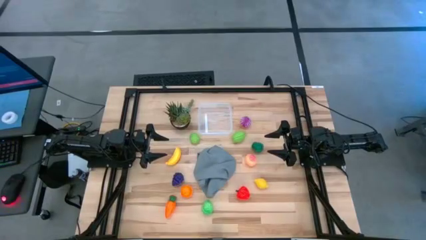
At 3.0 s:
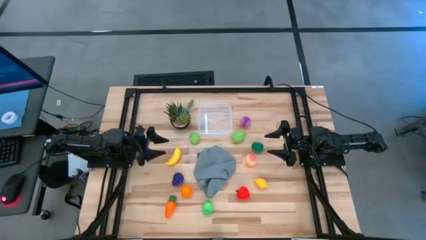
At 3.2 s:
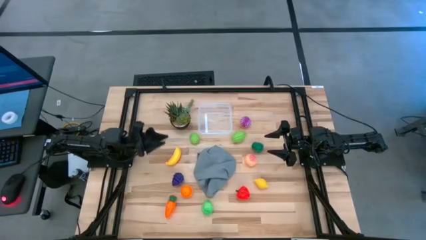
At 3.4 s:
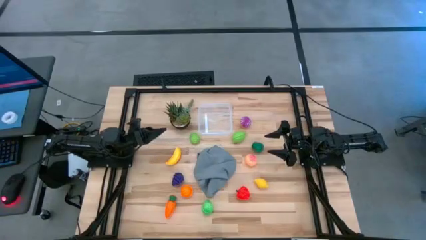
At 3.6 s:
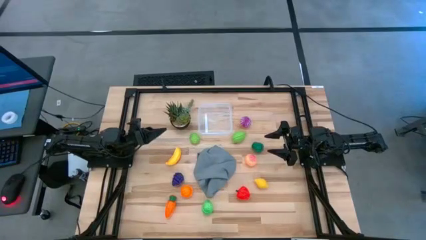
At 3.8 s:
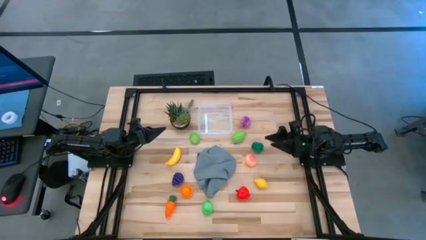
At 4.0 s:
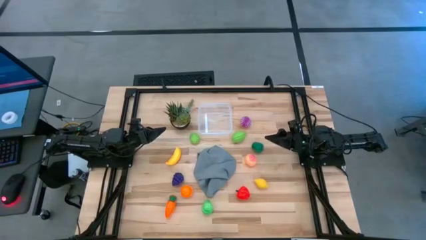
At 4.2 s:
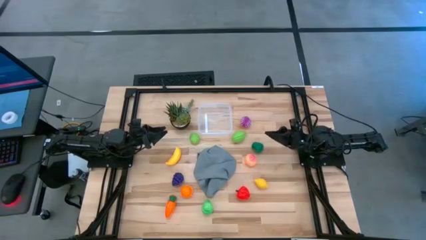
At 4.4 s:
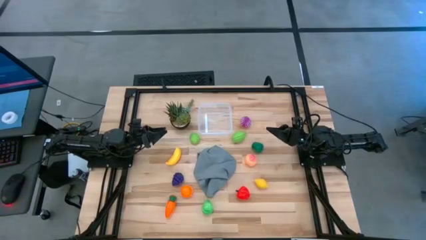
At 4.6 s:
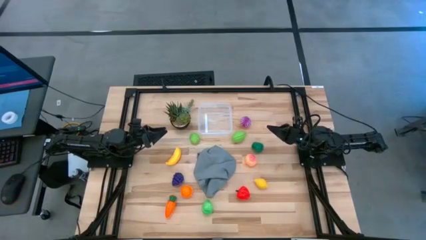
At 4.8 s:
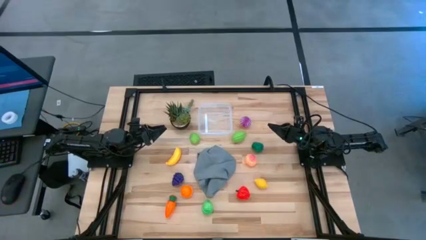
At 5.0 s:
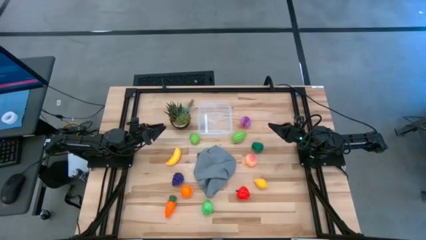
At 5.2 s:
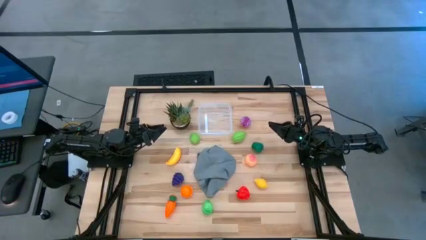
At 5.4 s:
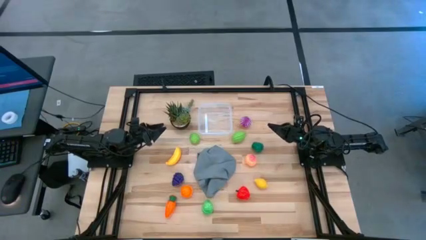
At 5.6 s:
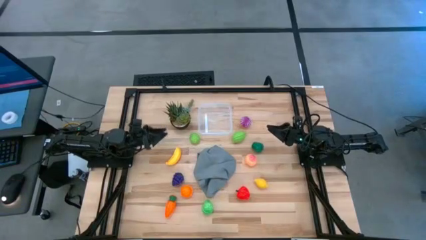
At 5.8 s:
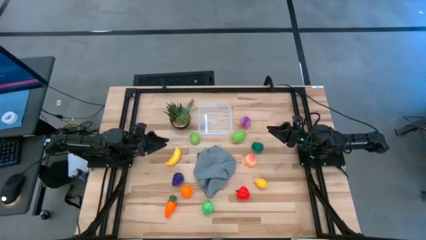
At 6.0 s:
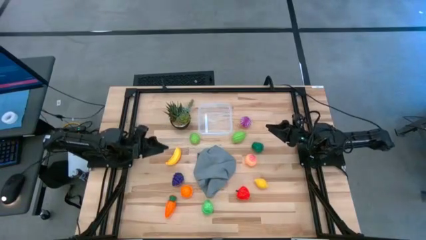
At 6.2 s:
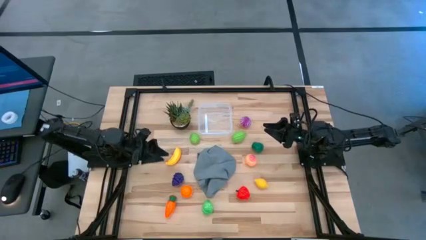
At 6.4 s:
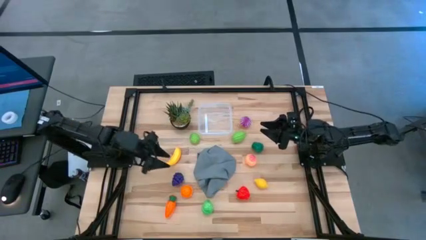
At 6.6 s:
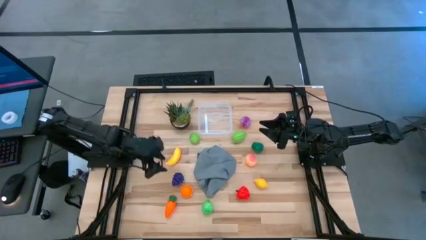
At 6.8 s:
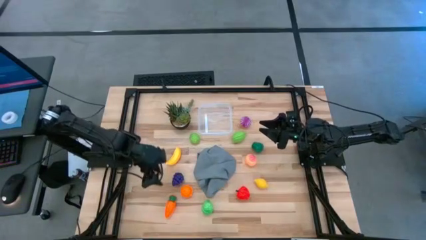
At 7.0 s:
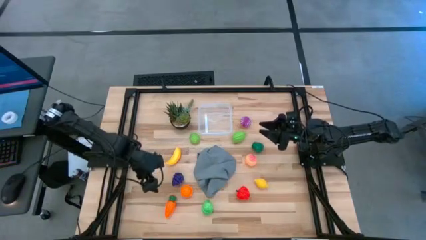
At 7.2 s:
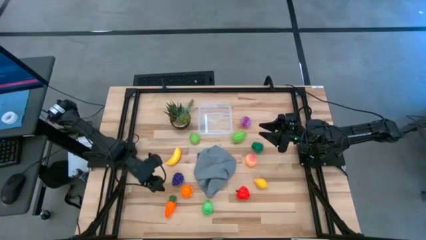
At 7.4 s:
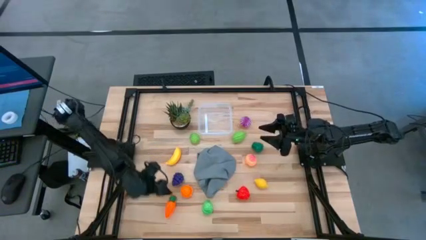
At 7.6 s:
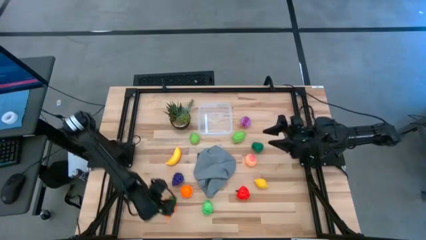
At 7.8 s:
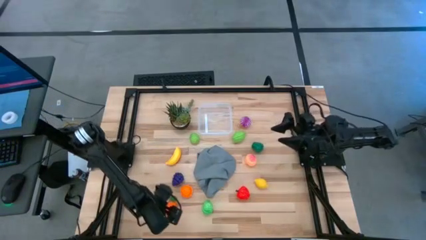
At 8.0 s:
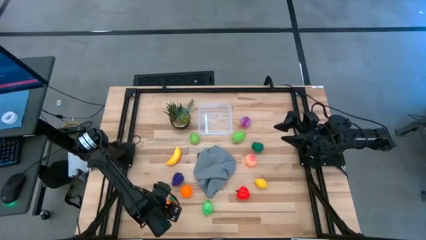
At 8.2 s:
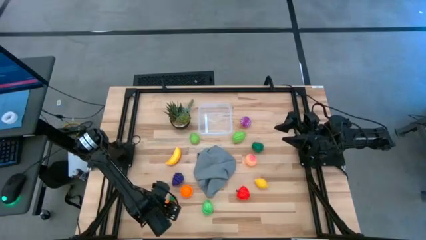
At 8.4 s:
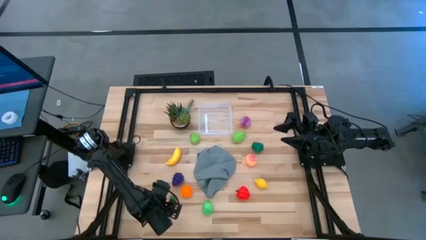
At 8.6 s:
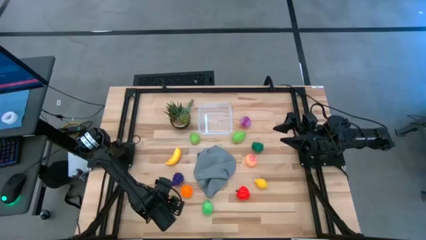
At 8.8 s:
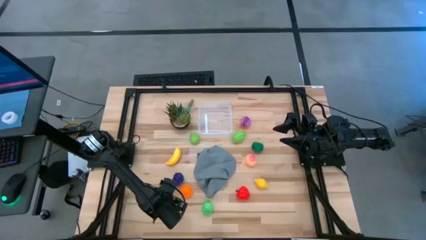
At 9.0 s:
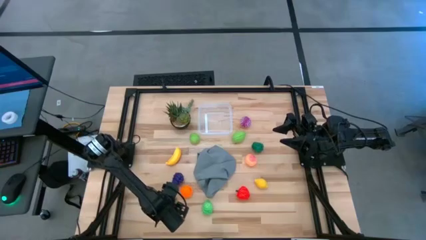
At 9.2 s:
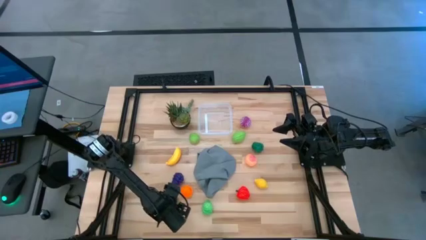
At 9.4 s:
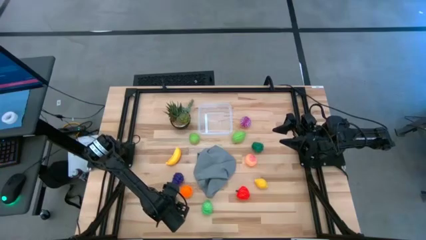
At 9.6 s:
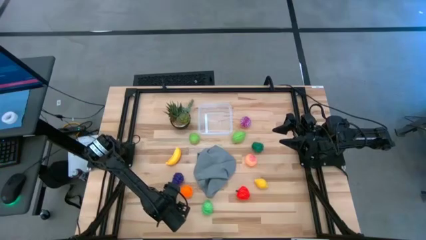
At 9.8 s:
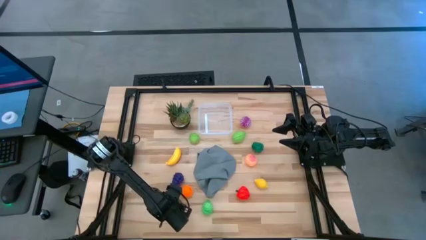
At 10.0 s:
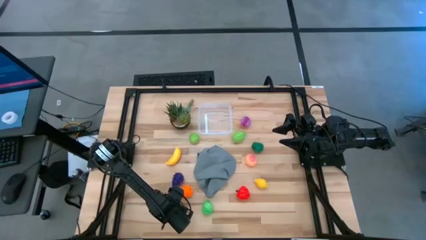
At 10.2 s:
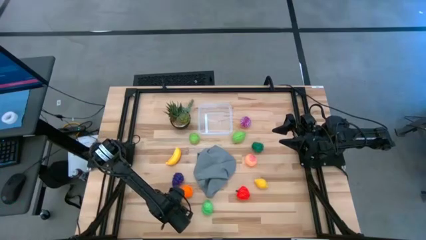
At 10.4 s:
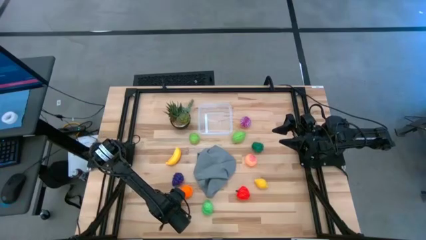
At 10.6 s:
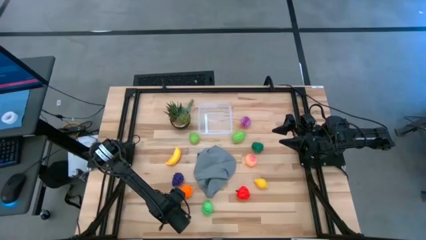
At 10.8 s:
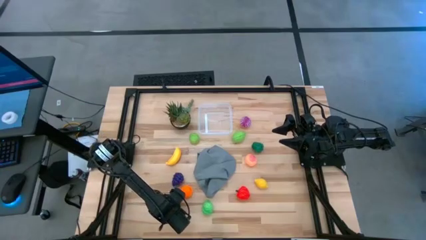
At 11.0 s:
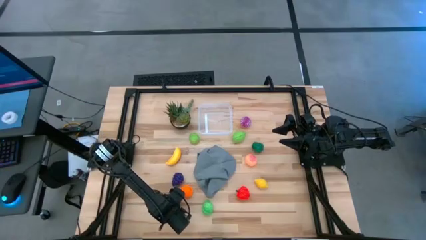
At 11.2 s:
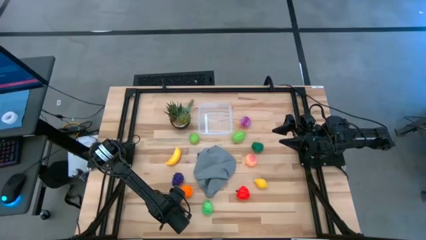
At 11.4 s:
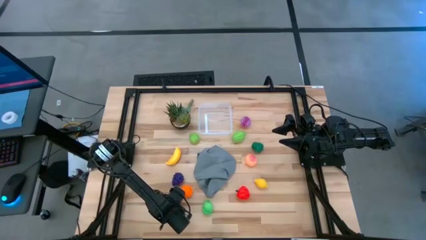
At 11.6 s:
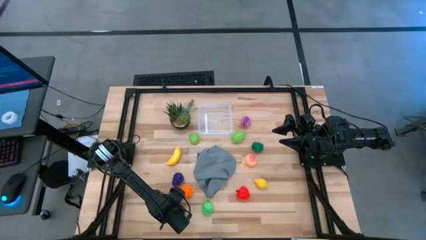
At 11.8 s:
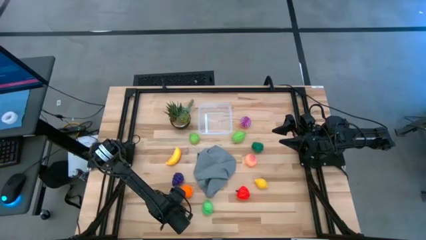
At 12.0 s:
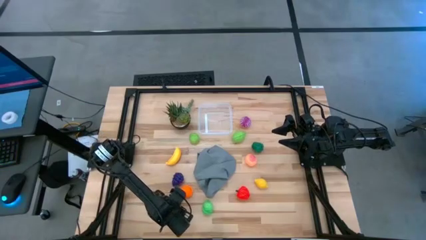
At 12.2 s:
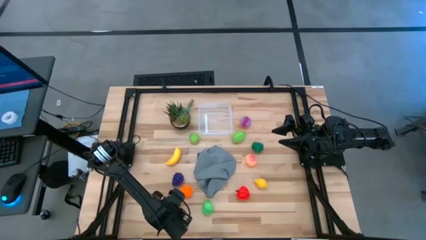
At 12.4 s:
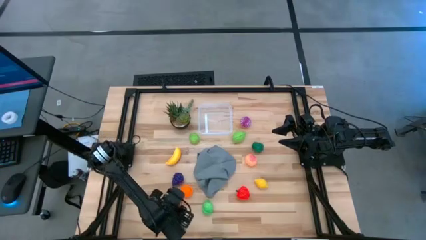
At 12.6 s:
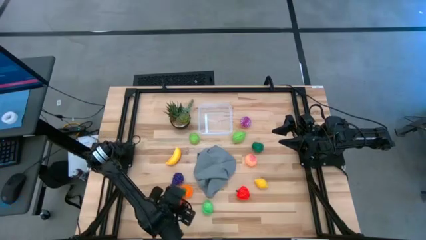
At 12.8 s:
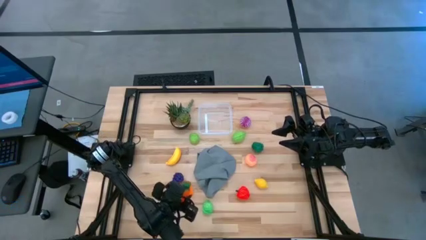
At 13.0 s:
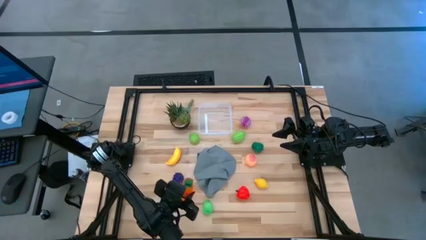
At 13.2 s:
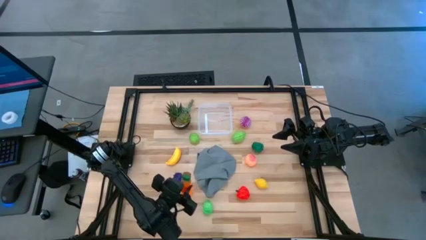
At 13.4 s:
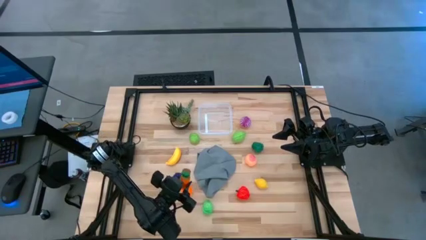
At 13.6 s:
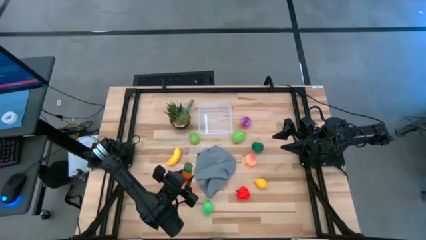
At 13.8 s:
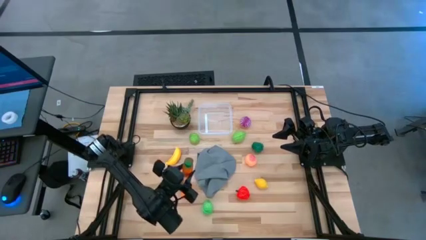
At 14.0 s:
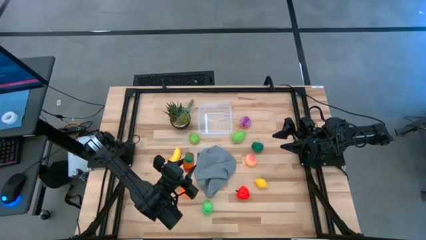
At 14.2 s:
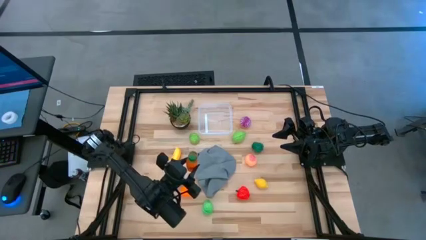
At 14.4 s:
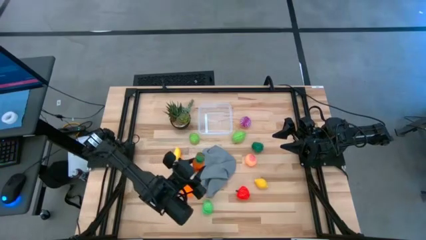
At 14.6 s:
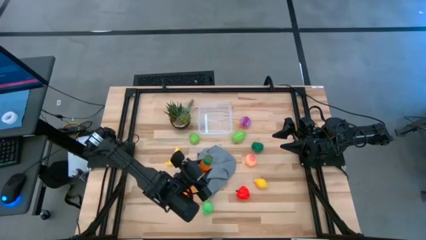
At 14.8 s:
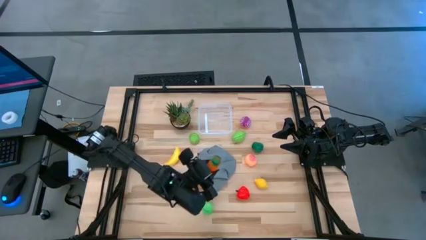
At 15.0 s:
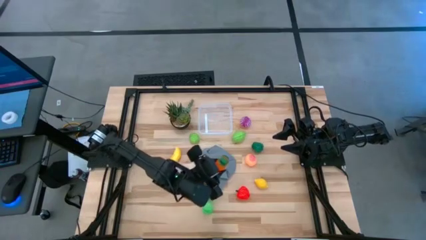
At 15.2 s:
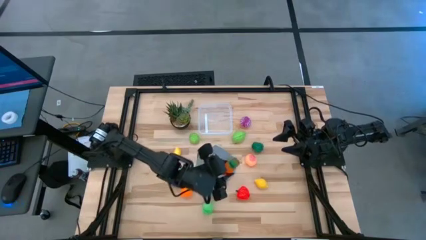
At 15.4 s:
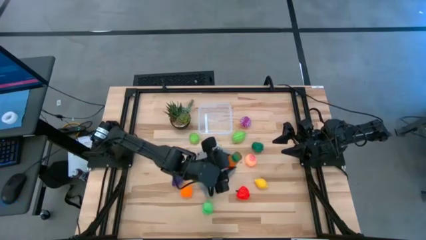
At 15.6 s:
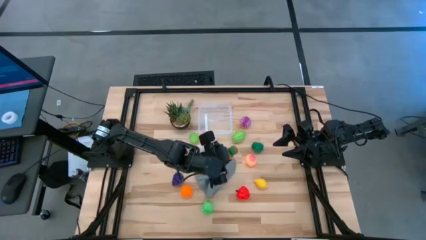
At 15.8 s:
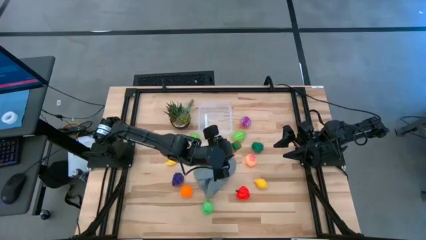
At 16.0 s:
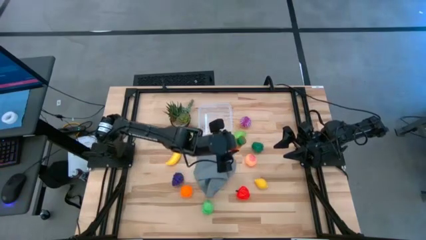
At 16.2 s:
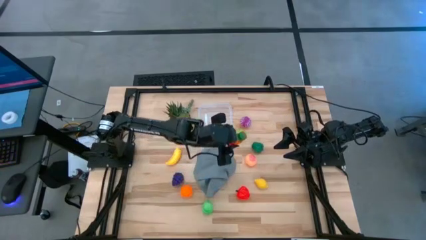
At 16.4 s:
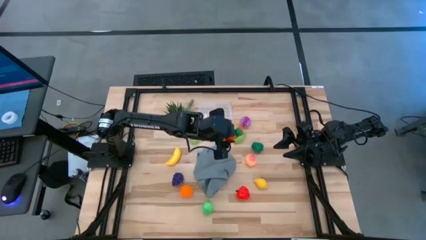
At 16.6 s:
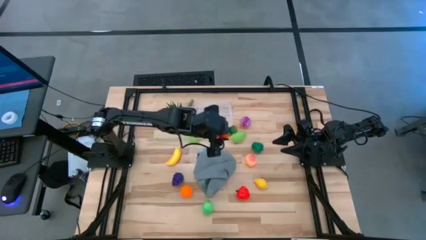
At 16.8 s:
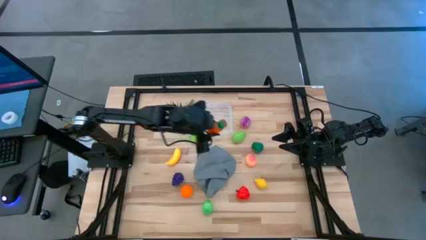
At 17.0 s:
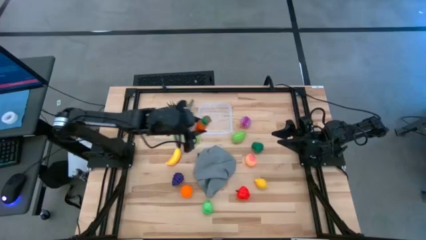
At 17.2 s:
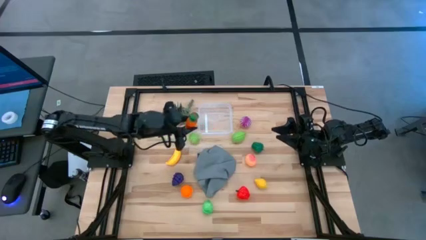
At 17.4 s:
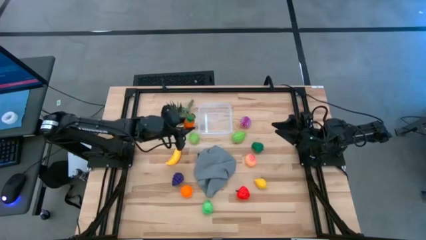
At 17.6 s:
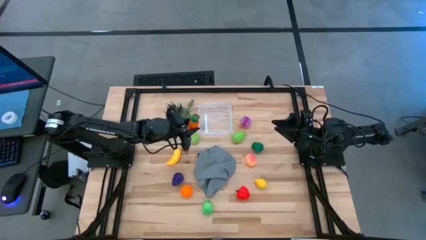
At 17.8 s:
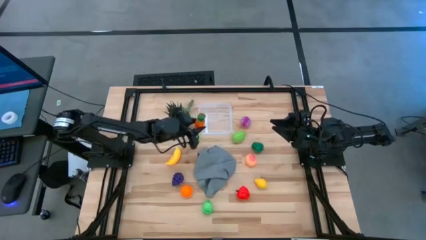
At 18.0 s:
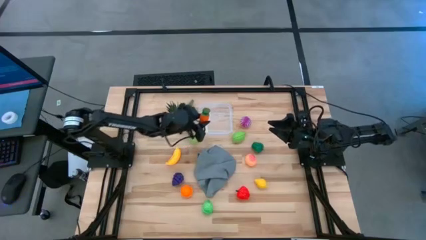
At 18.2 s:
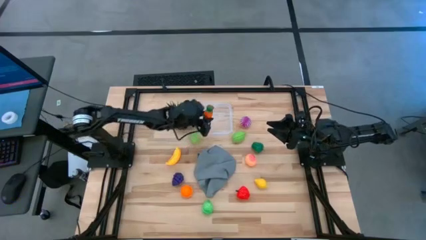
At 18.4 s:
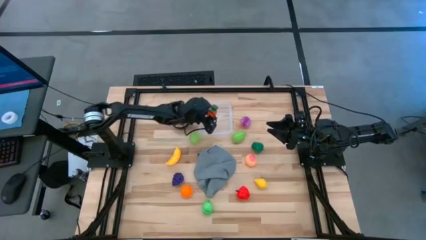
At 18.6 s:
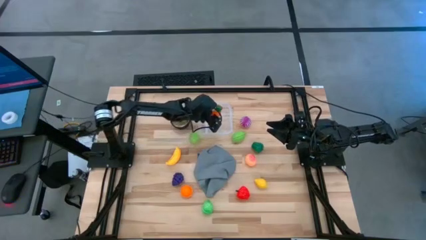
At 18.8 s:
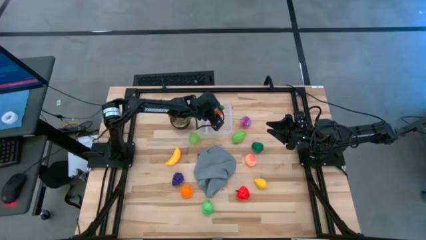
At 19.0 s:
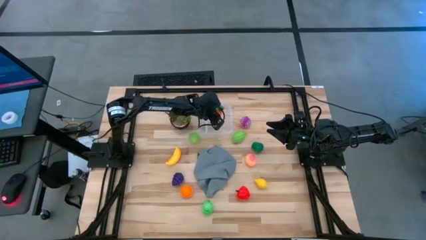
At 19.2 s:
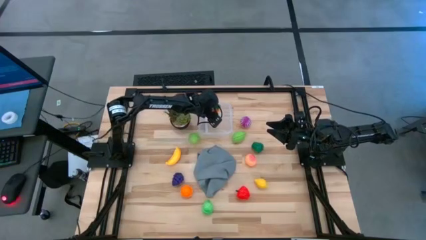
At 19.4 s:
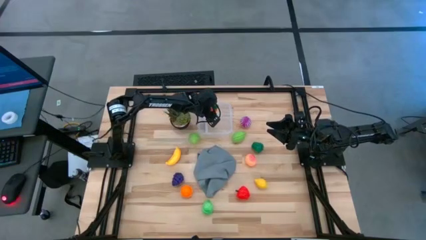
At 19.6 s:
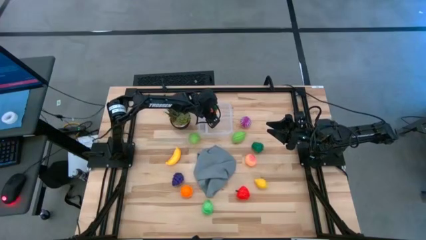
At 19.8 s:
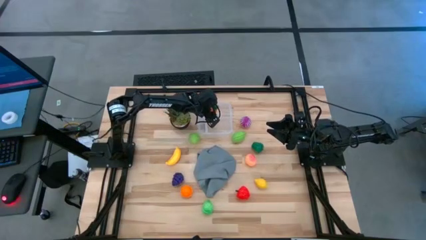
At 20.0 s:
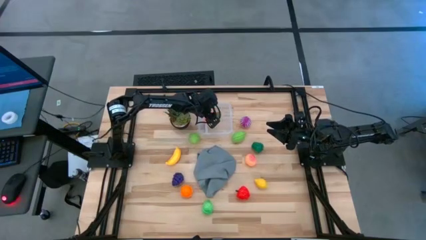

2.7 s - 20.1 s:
Task: Pick and placing Produce into tupperware
Put the orange carrot into the transparent container
